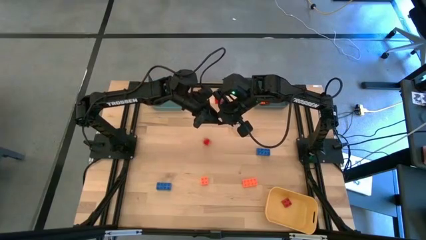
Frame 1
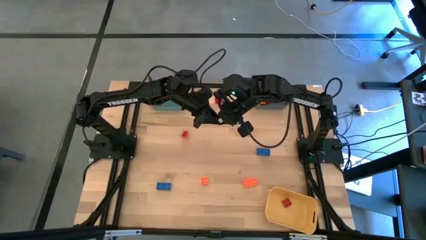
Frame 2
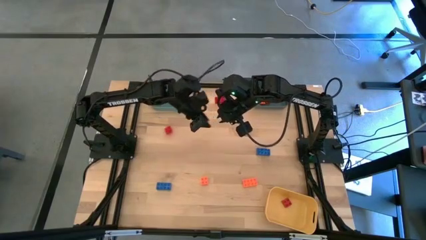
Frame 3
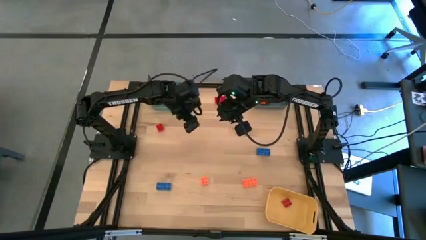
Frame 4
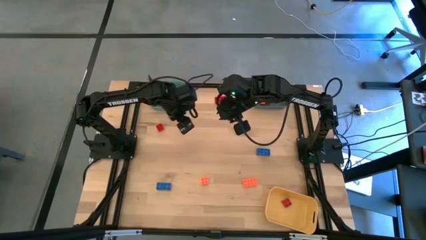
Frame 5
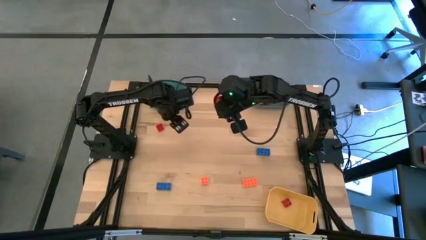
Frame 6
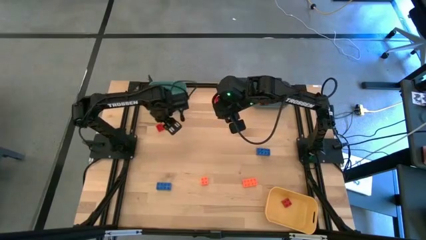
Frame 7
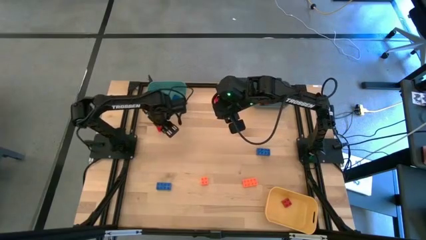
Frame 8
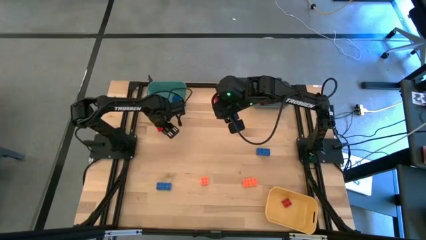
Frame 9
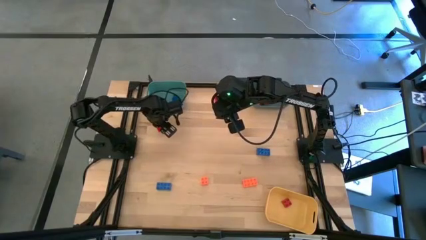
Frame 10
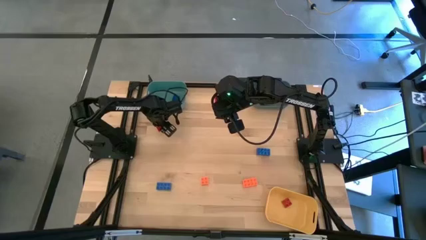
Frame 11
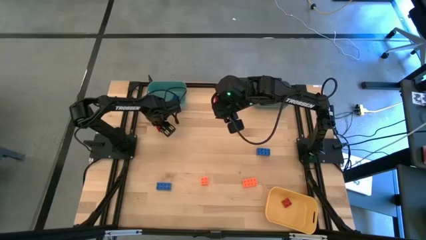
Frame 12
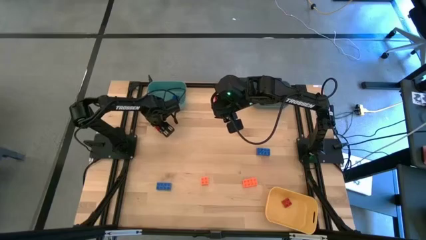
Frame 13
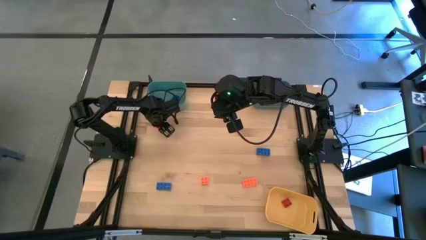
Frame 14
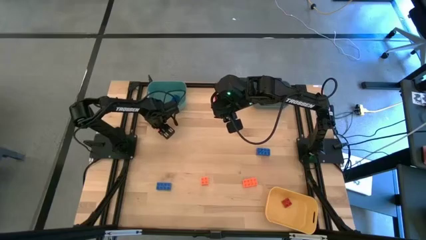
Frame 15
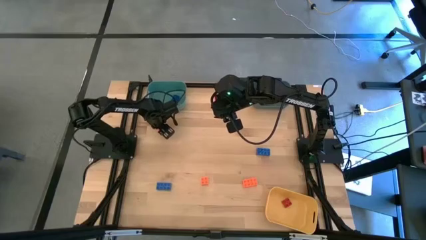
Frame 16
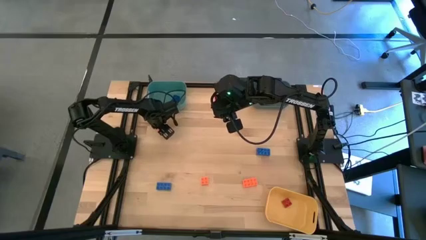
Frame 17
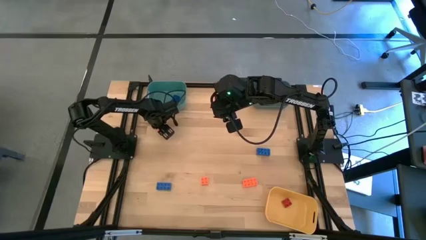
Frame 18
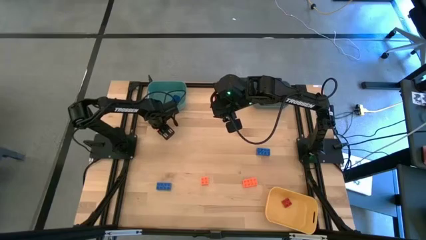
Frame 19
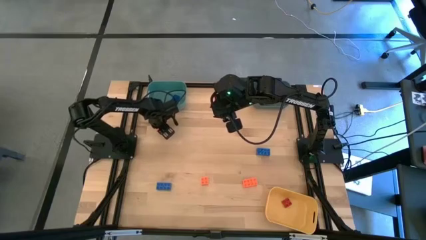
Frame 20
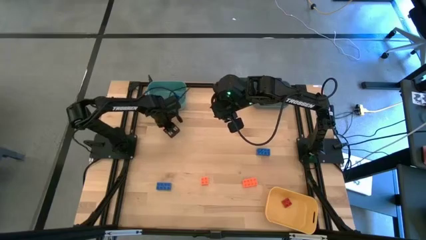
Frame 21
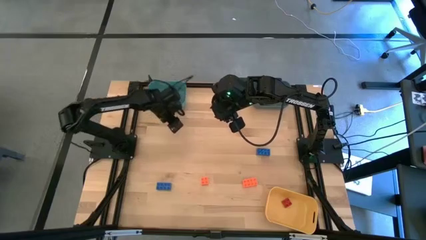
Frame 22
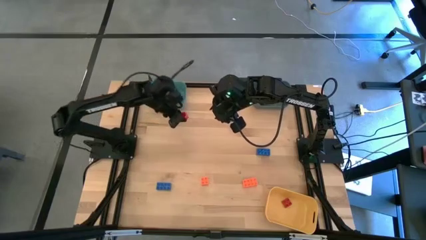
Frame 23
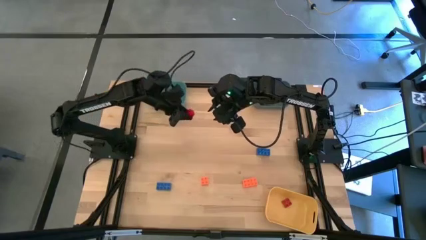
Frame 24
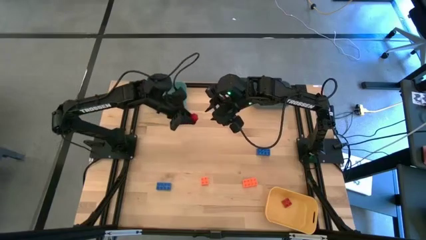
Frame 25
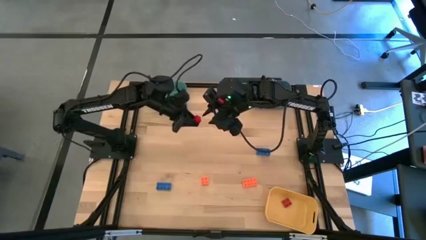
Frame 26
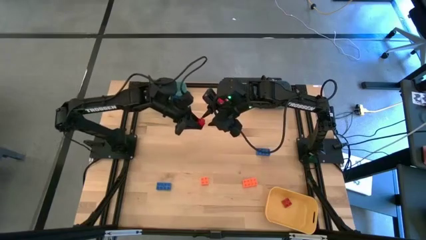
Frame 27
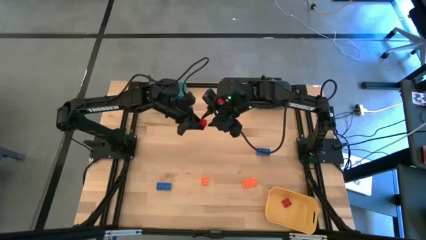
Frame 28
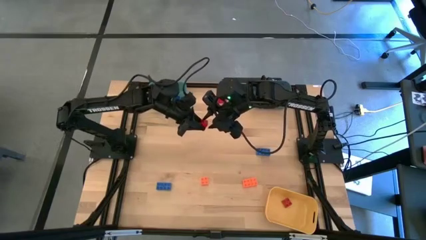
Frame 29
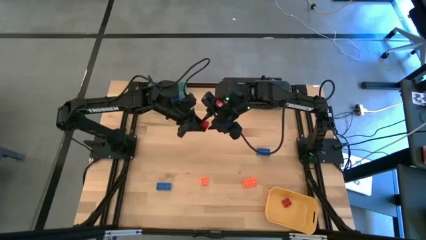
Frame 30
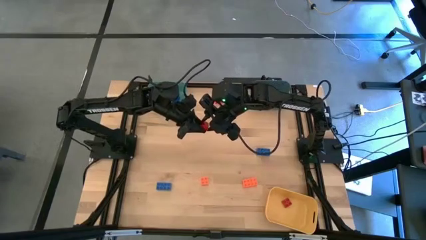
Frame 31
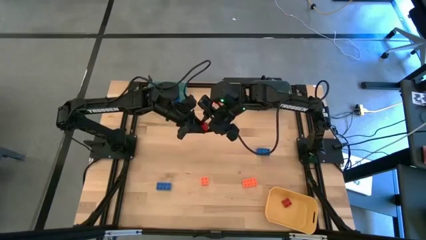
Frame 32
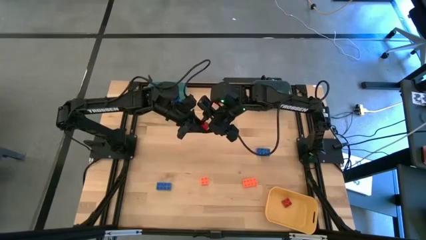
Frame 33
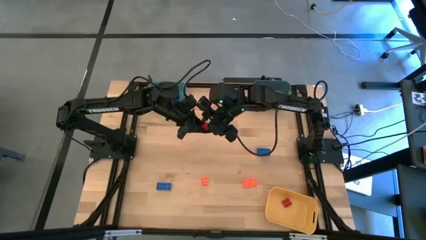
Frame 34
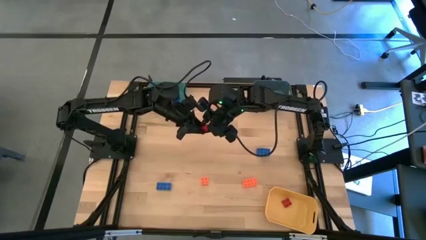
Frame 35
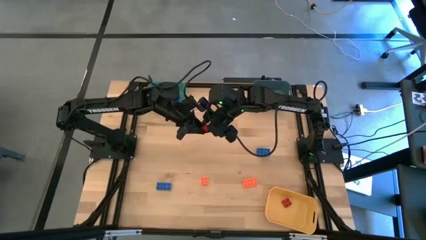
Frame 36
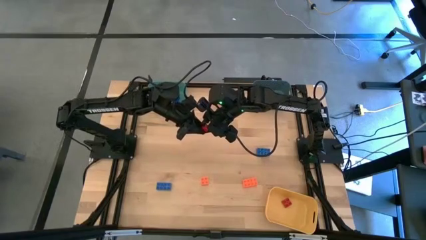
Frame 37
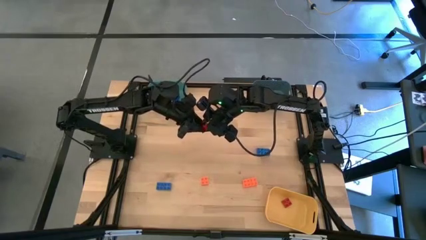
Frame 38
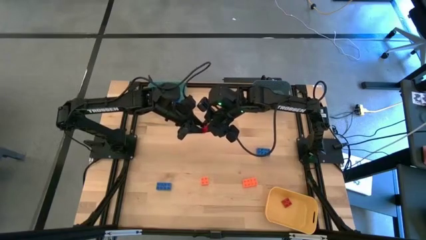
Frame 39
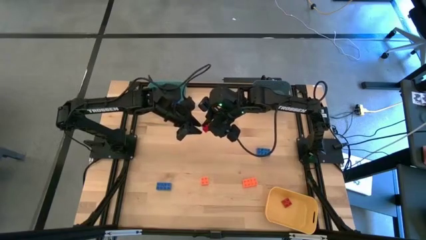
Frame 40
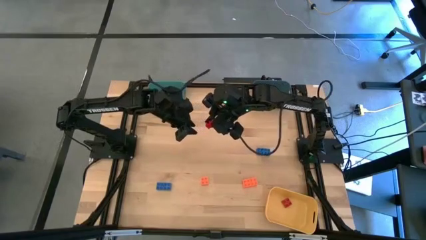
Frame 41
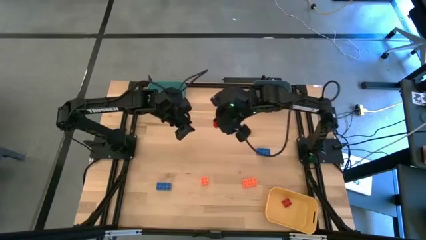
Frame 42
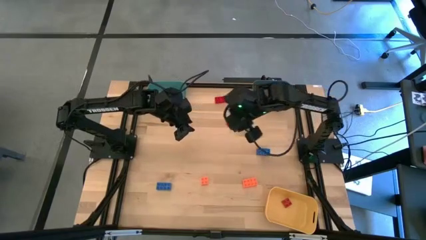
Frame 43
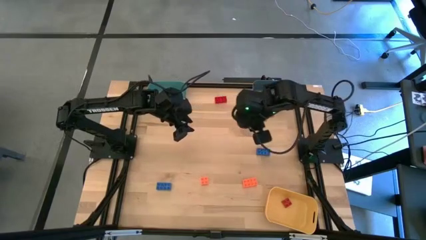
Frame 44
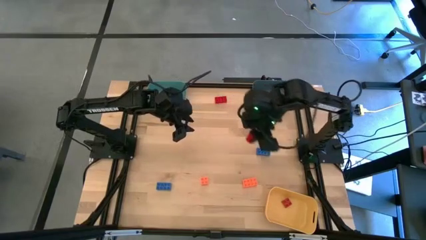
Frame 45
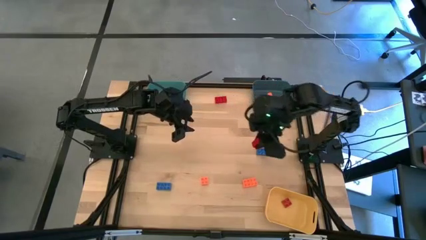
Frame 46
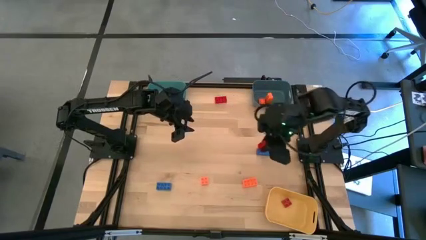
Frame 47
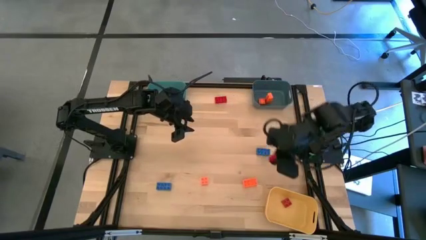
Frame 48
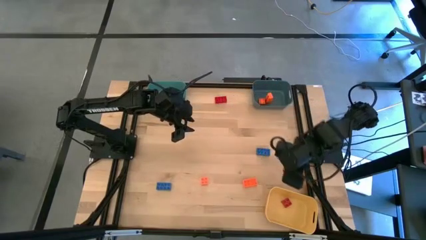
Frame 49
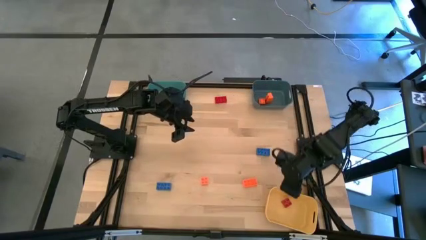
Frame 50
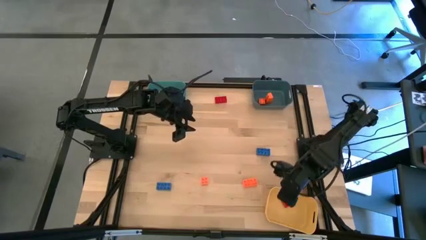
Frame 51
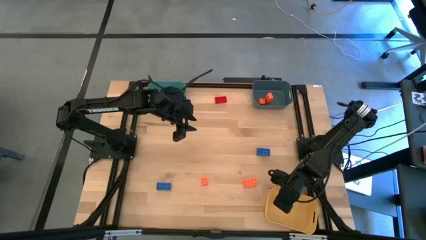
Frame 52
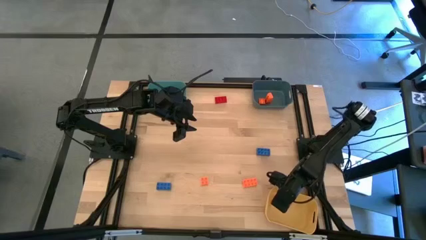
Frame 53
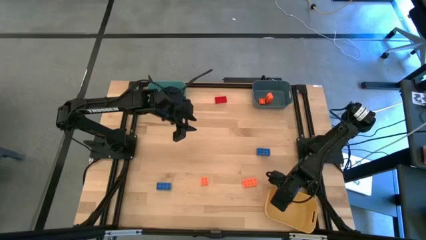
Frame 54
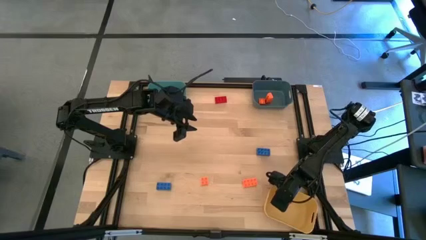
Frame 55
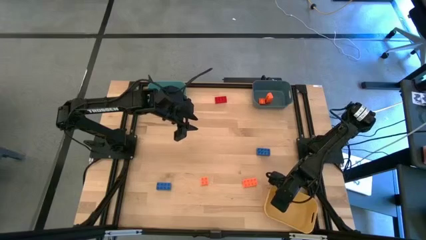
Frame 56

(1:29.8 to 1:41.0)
Task: Sort & place blocks by color
Put the red game piece into the yellow bin

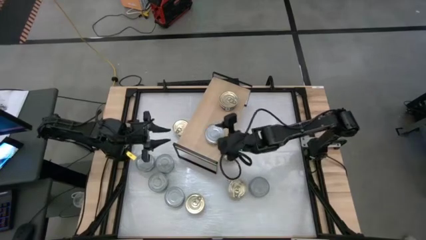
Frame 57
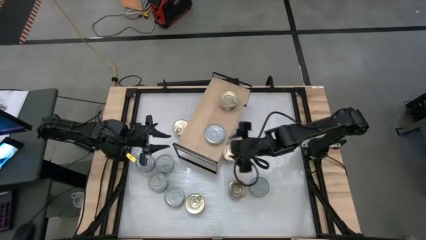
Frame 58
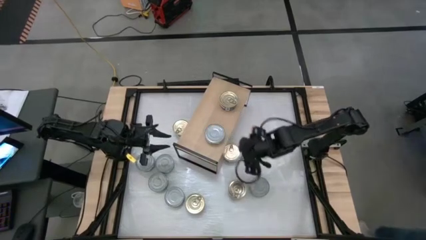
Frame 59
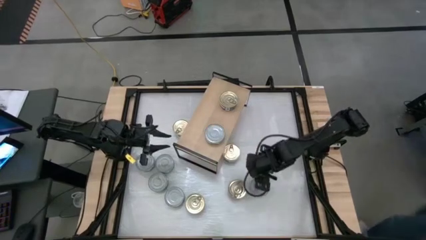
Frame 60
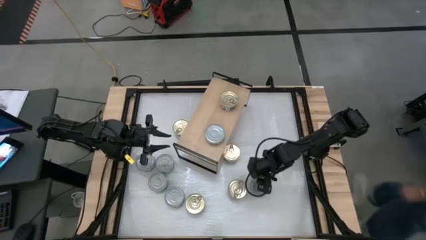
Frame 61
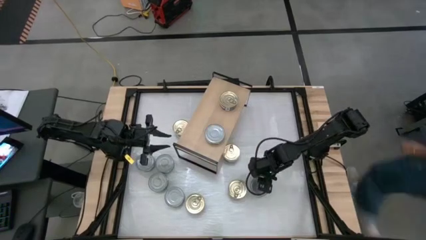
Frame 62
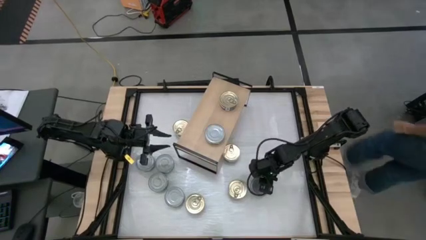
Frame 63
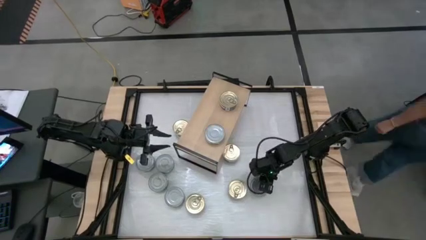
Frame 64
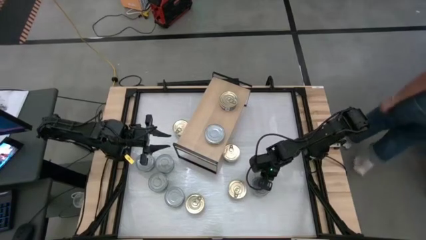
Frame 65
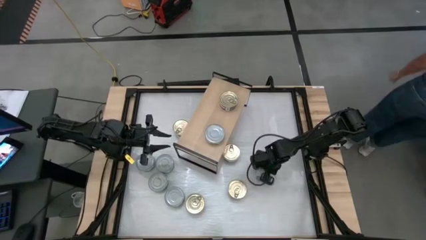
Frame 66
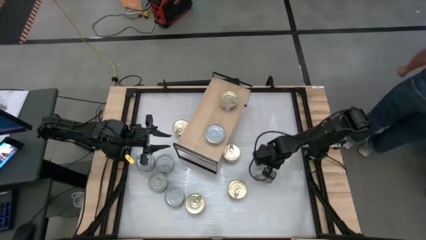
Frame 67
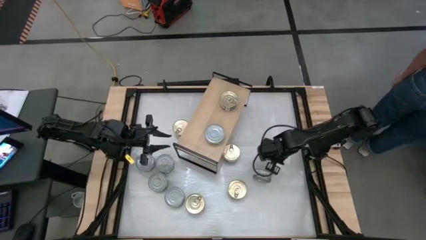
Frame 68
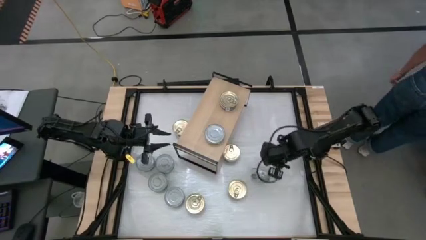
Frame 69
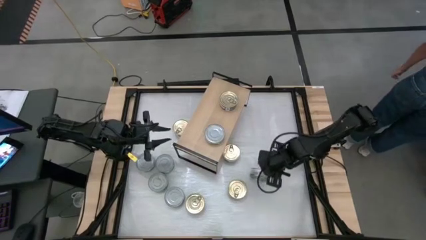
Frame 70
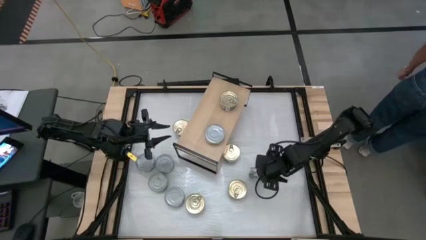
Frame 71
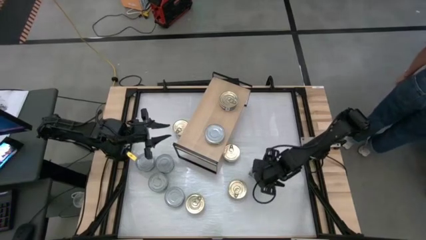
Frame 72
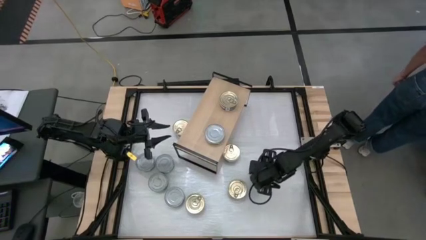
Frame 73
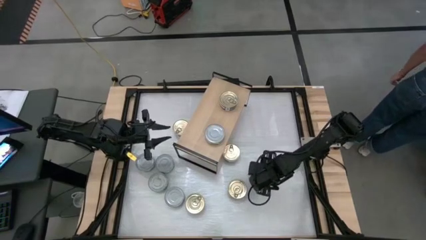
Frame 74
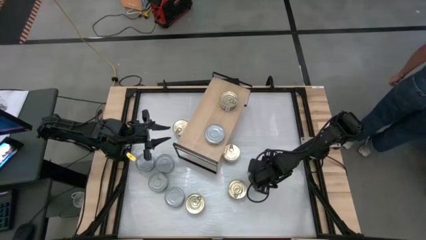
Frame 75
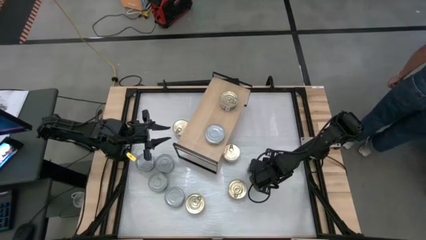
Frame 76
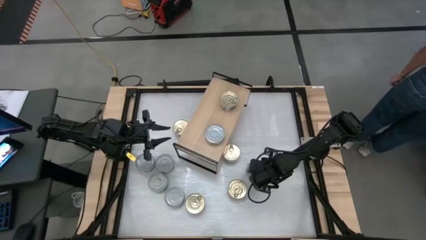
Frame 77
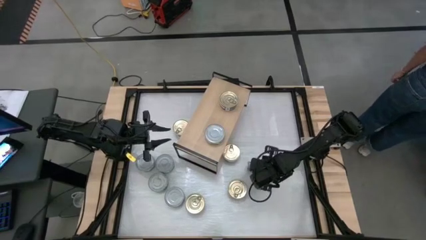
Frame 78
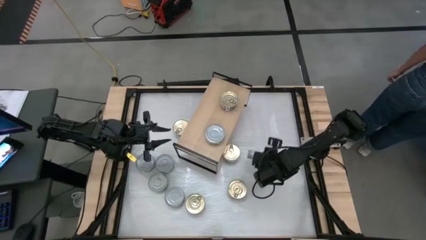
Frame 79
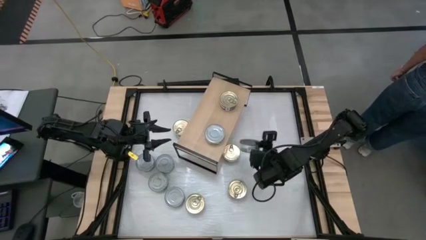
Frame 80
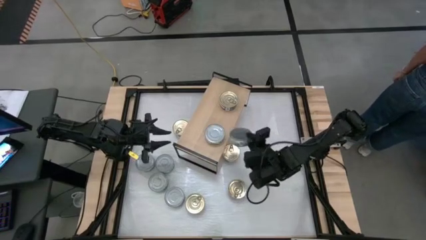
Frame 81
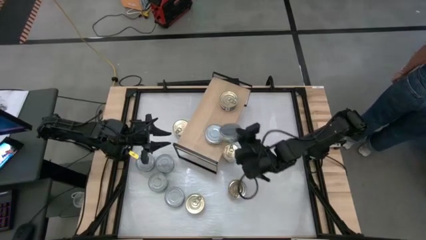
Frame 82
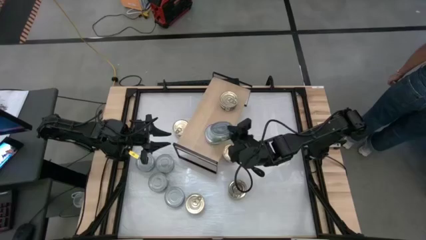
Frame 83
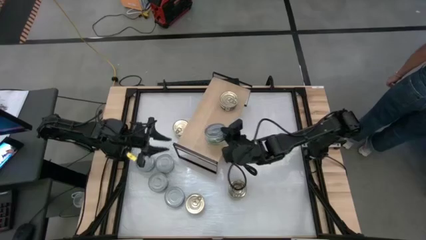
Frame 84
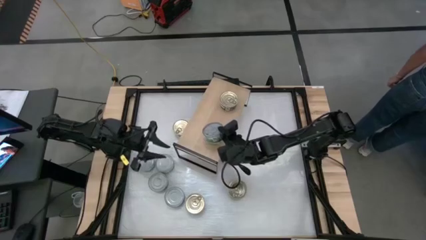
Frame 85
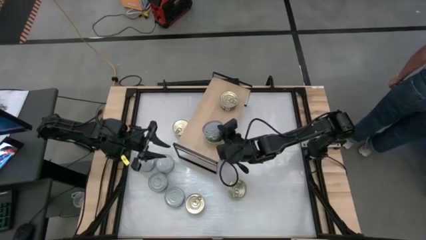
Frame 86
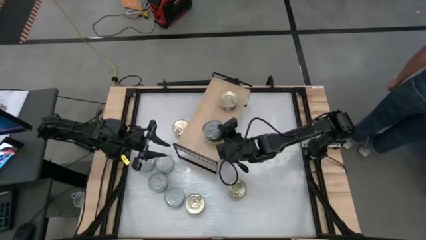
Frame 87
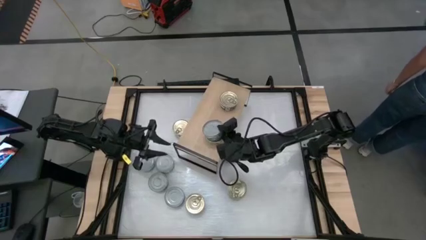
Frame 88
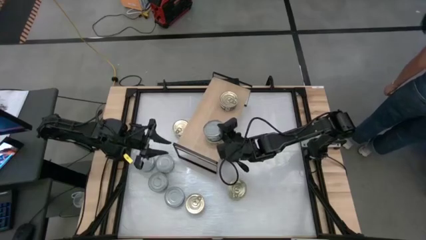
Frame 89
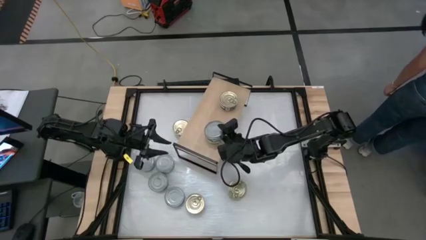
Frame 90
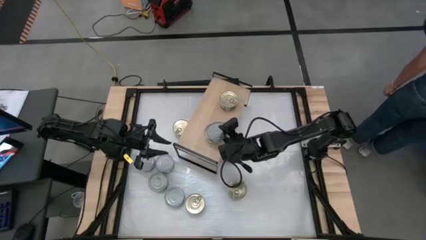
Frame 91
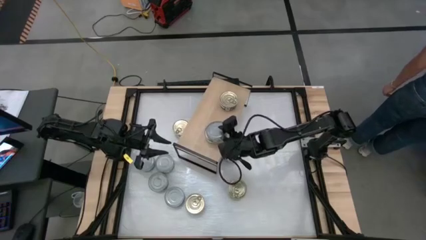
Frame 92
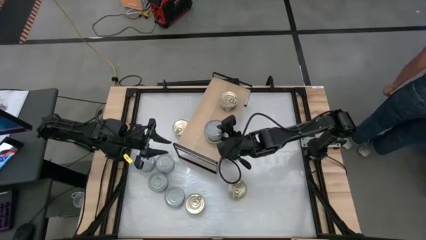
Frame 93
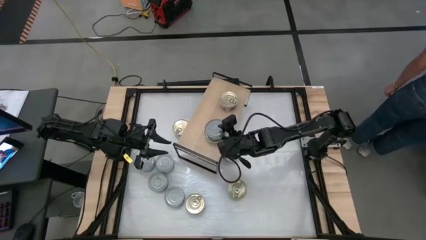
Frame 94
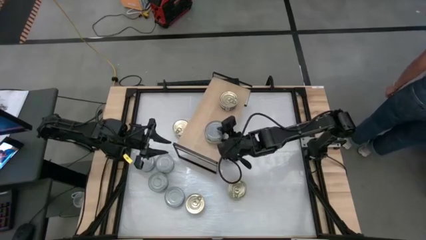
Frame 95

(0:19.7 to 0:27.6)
Task: Stack canned seafood by type on shelf
Stack the green tuna can on top of the other green tuna can
